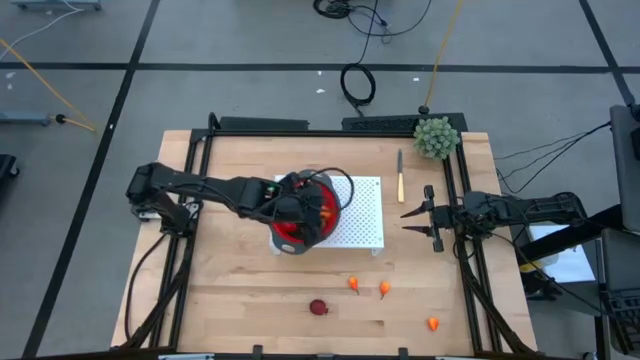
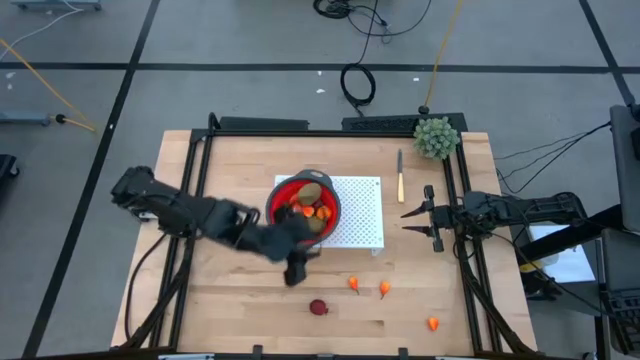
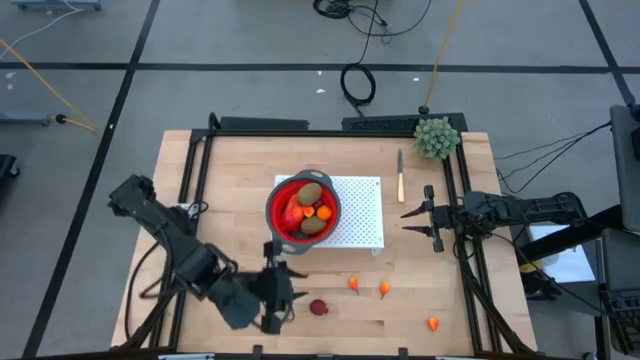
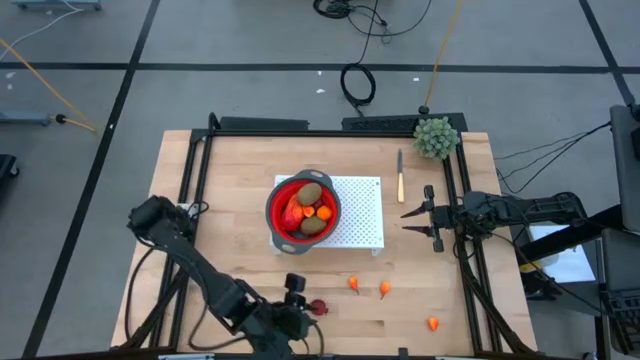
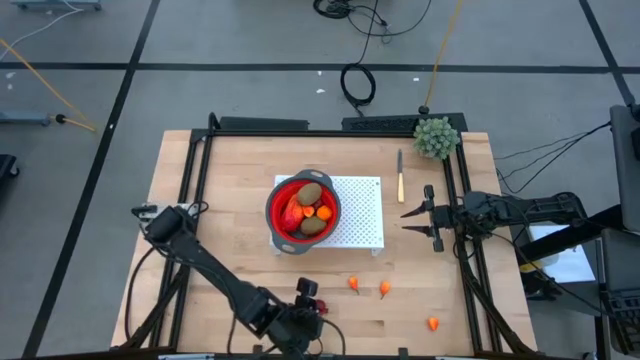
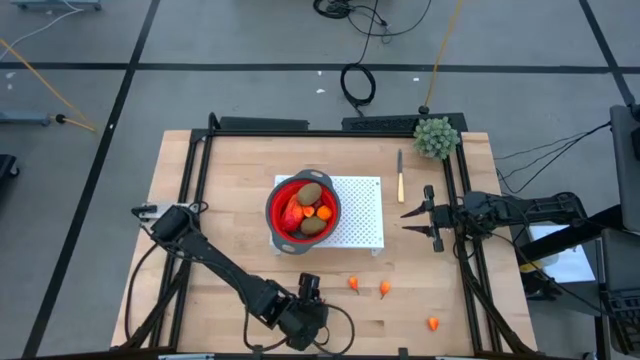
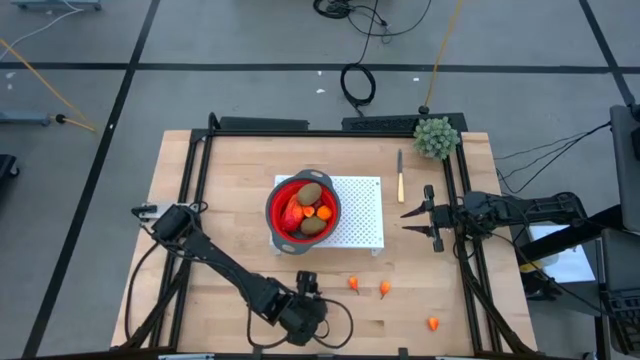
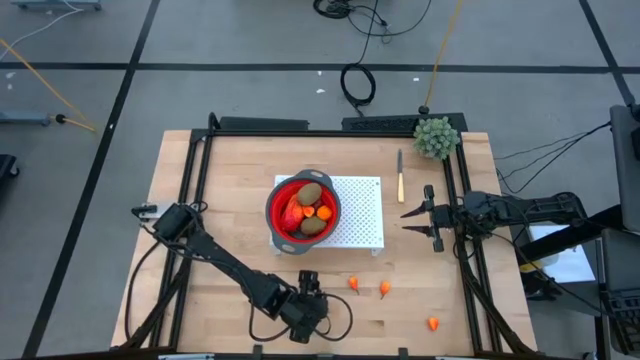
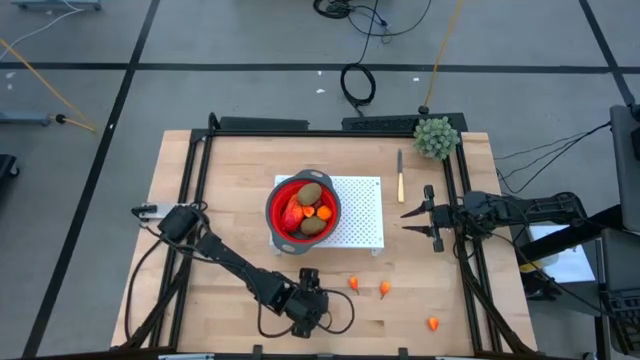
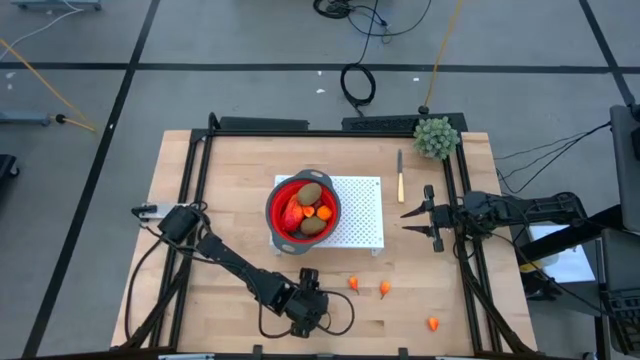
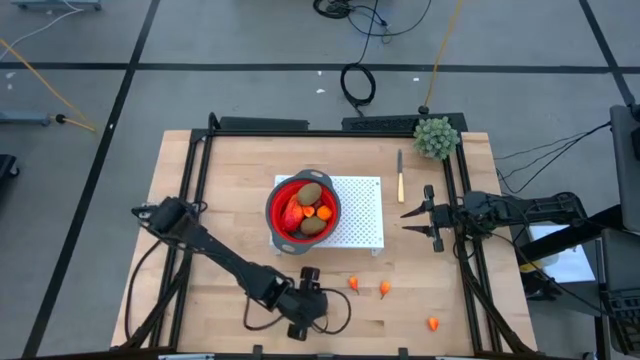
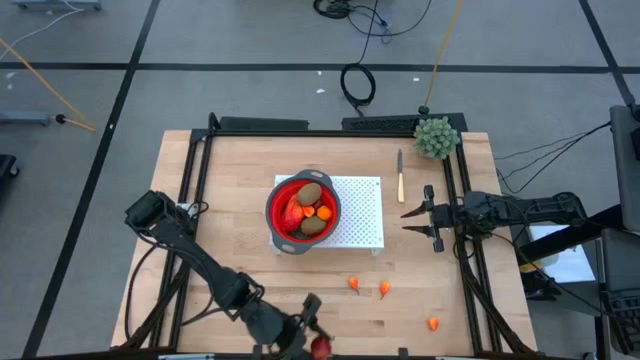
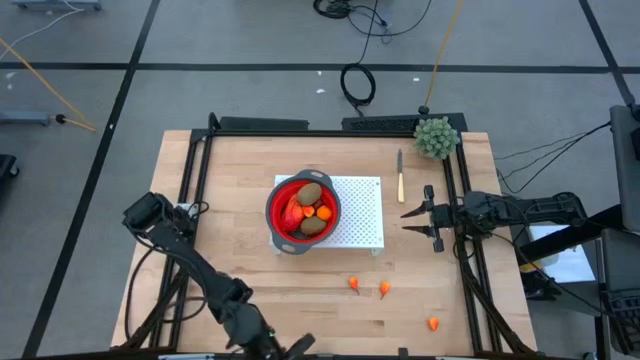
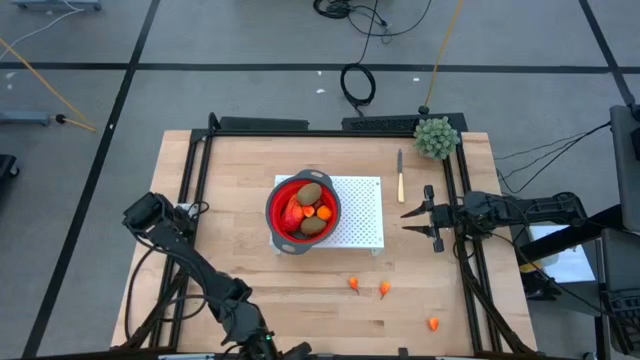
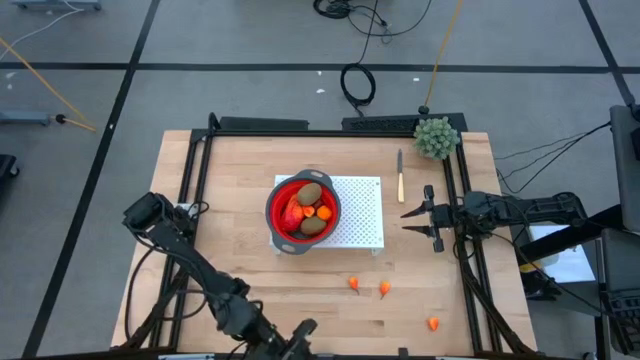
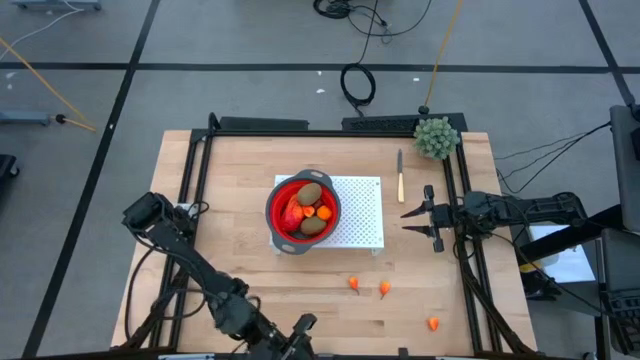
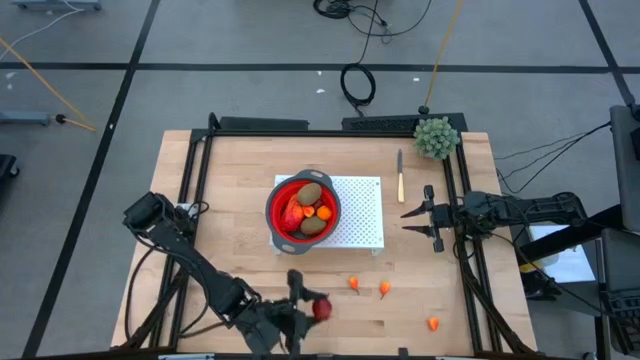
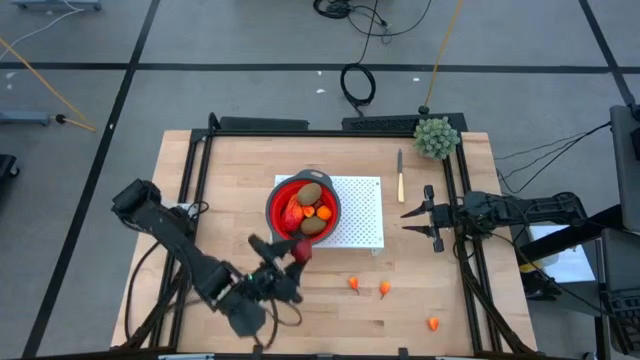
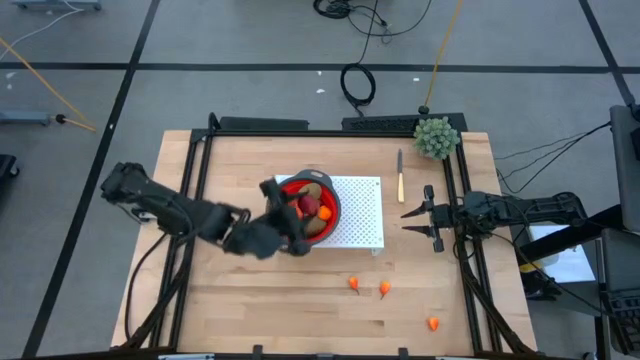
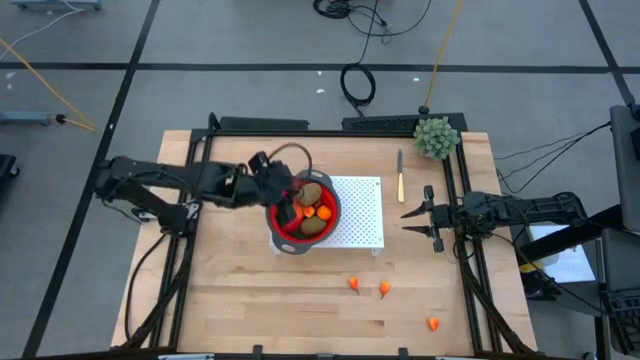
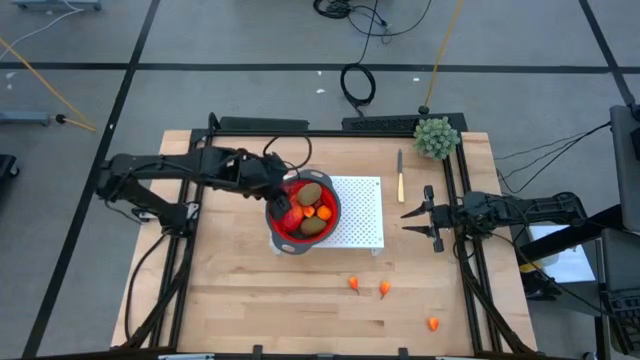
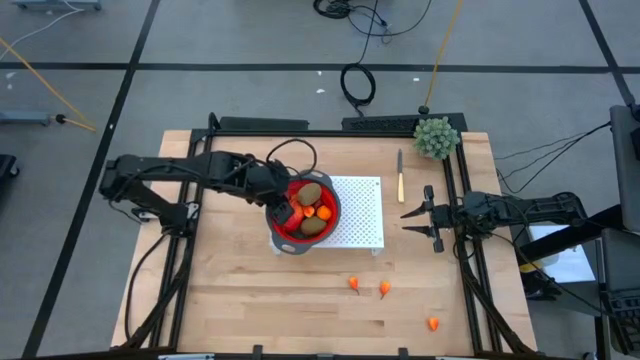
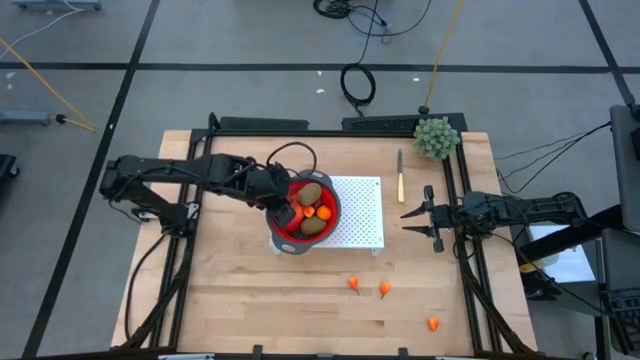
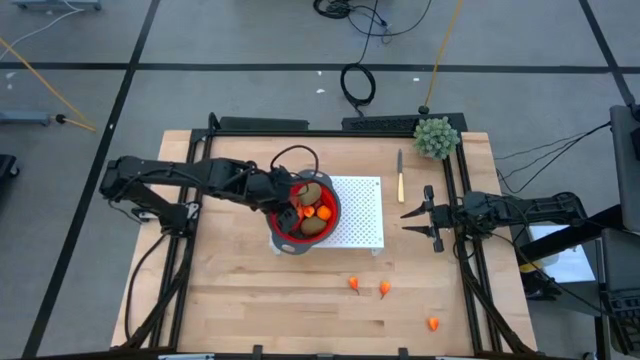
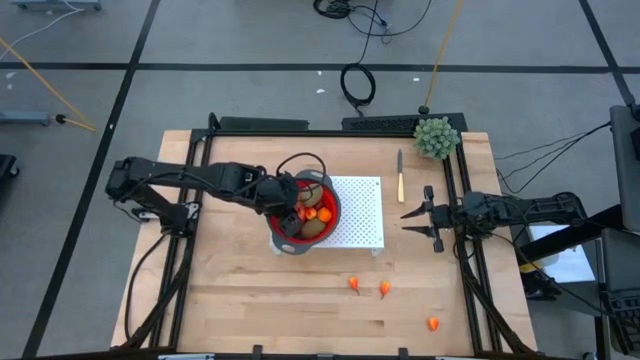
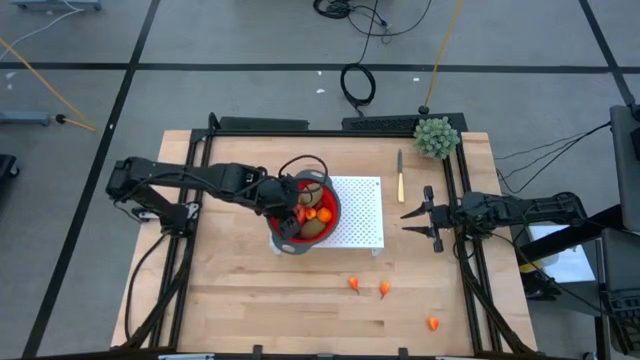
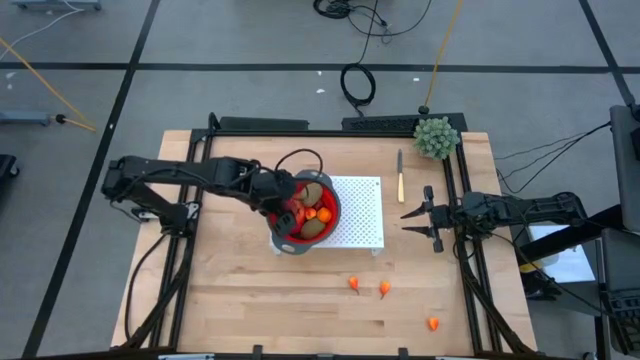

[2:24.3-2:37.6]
Task: Pick & Place Fruit
Put the pomegranate into the strainer bowl on the shelf

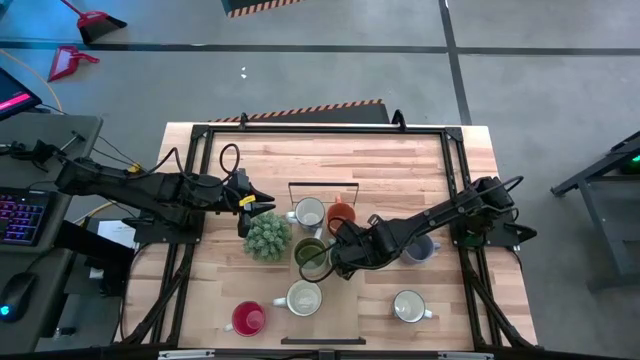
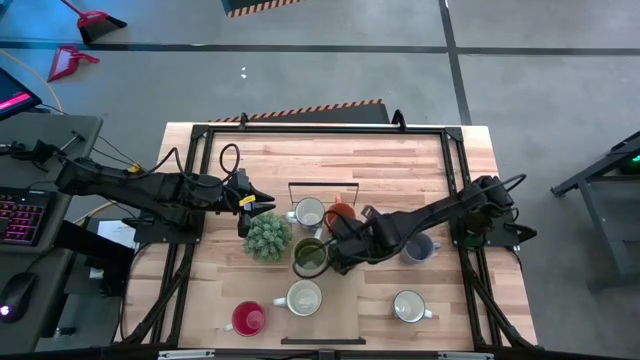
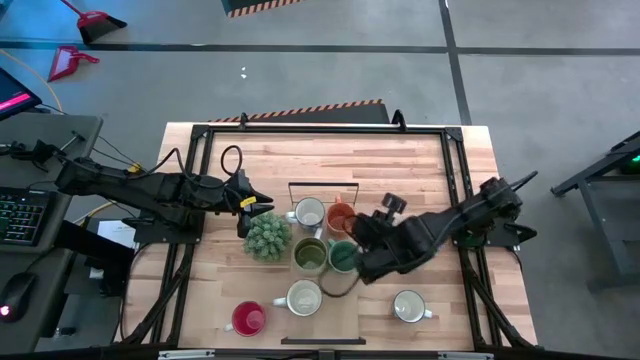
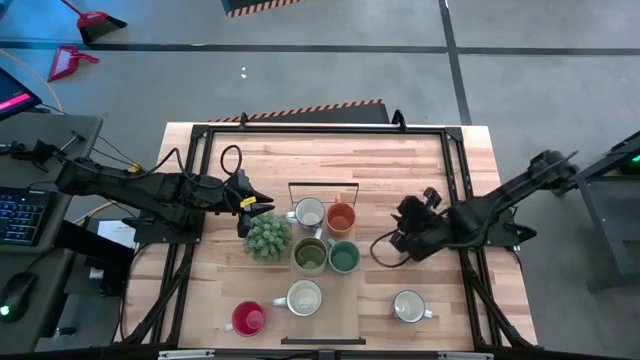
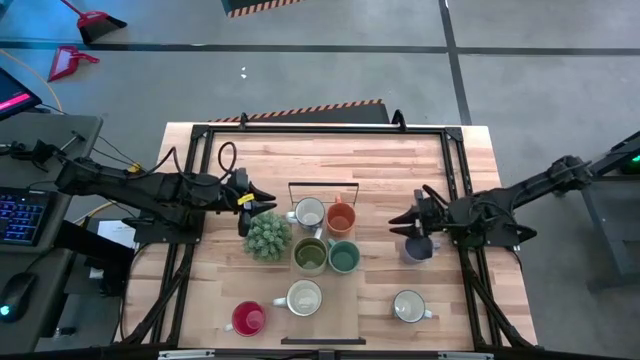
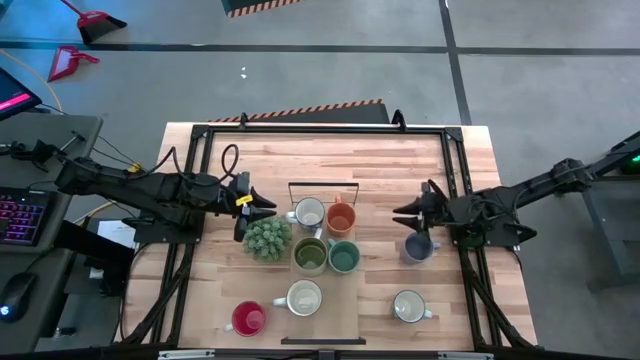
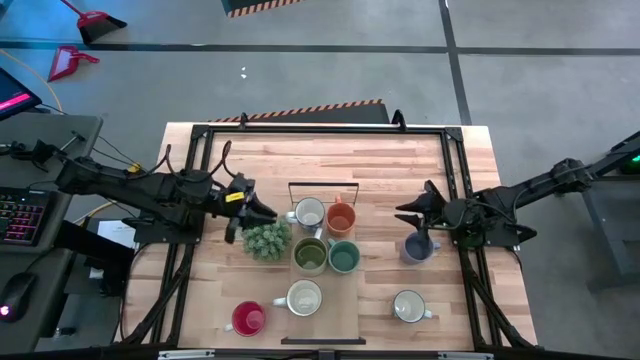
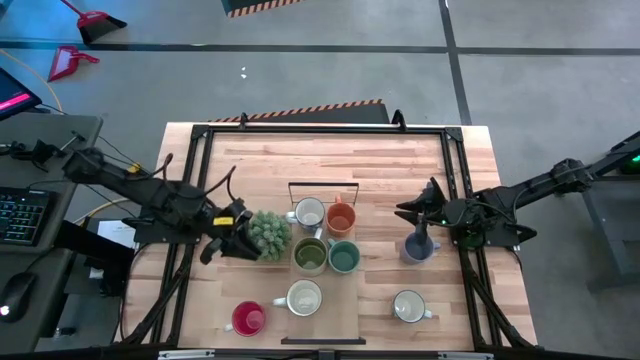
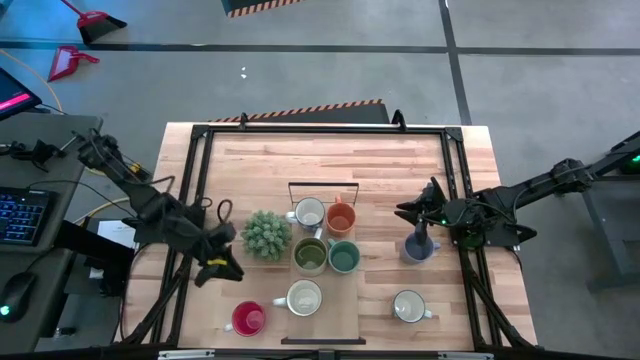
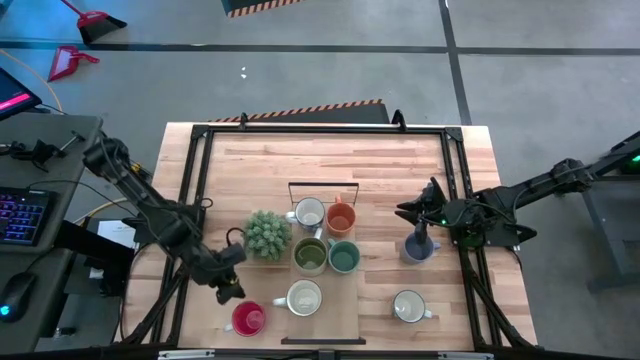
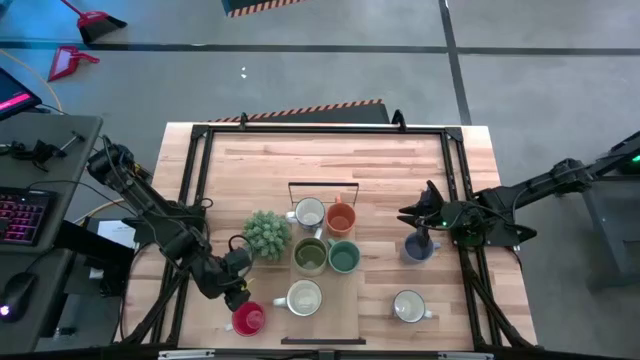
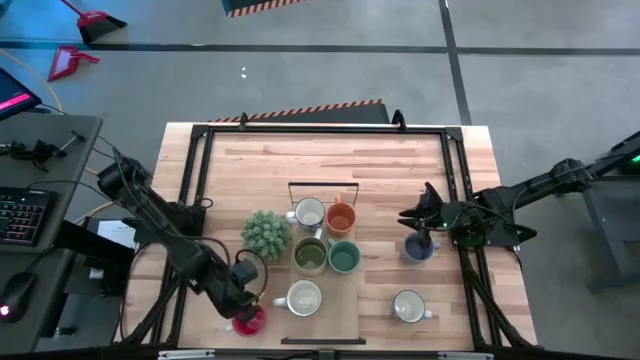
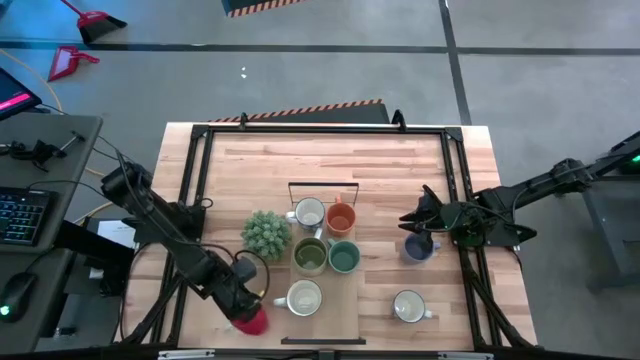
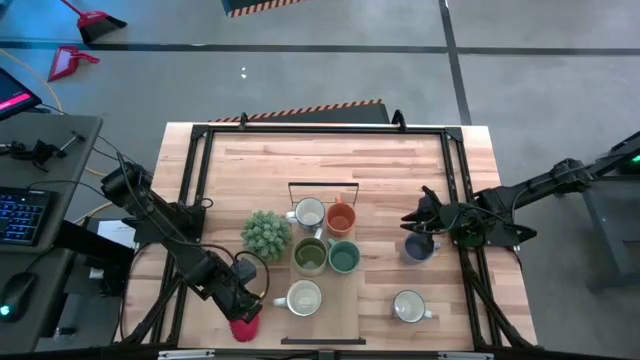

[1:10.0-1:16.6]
Task: Place coffee mugs
Put the red mug on the shelf
